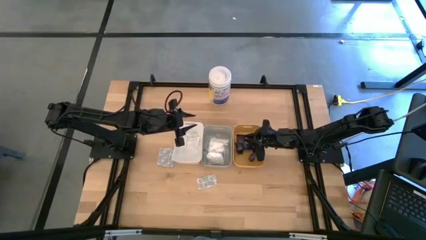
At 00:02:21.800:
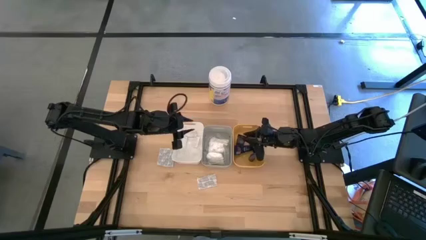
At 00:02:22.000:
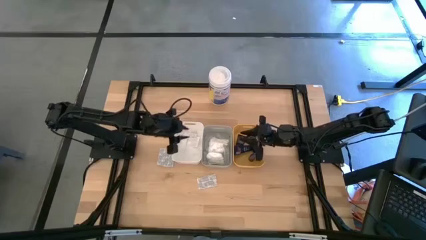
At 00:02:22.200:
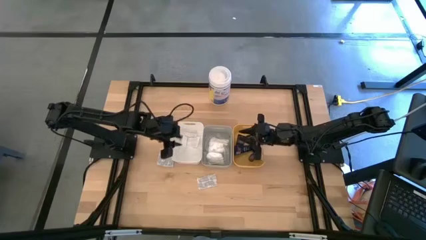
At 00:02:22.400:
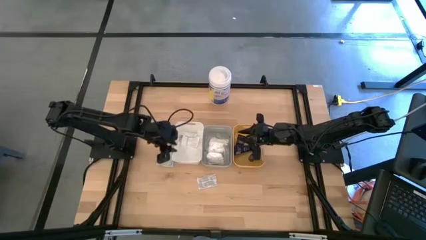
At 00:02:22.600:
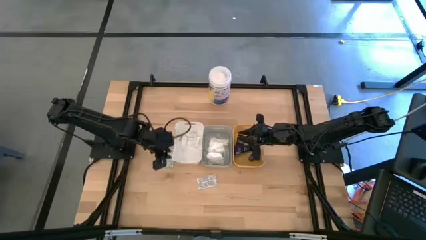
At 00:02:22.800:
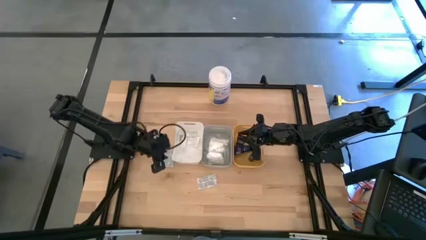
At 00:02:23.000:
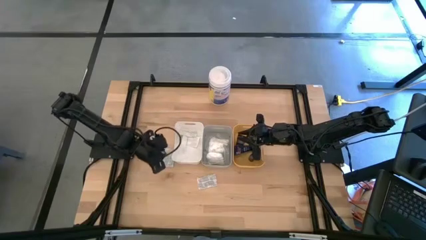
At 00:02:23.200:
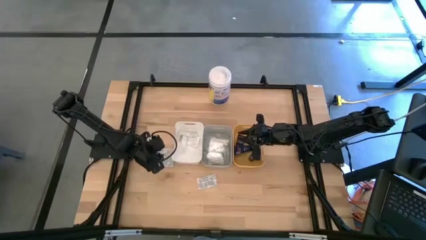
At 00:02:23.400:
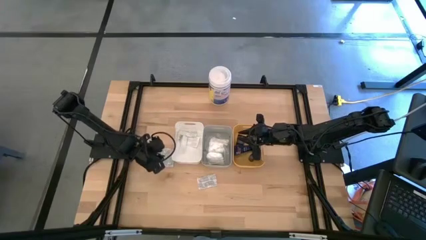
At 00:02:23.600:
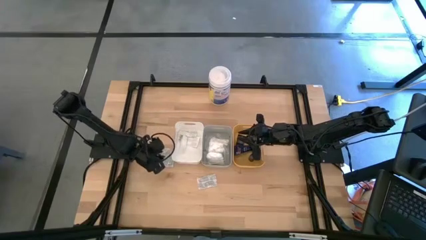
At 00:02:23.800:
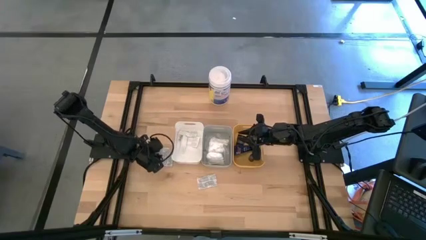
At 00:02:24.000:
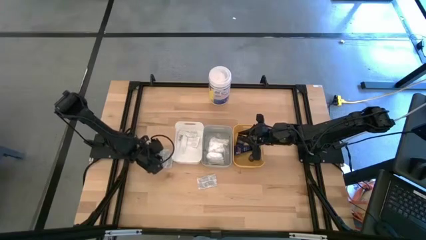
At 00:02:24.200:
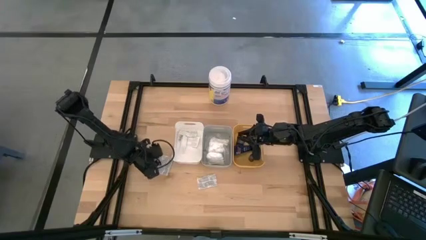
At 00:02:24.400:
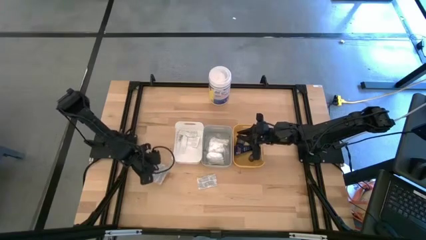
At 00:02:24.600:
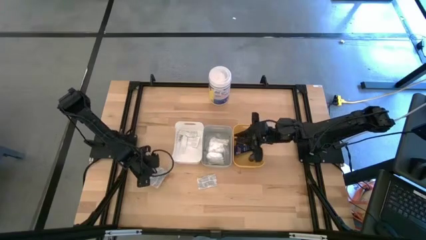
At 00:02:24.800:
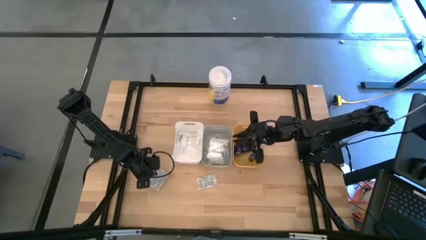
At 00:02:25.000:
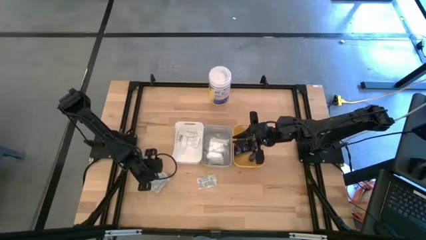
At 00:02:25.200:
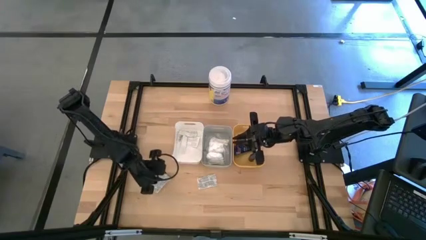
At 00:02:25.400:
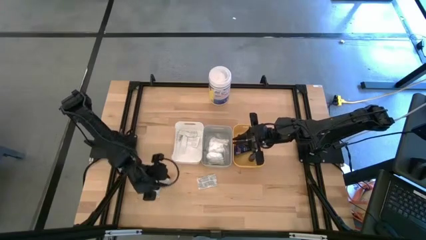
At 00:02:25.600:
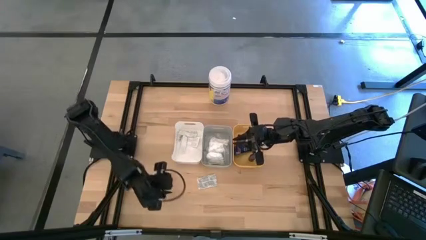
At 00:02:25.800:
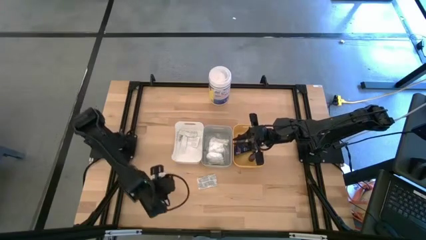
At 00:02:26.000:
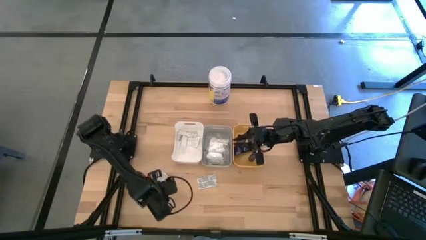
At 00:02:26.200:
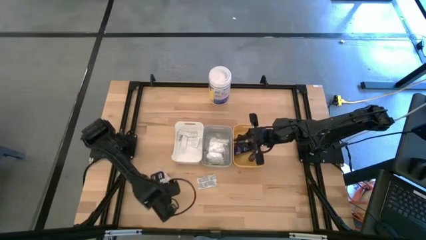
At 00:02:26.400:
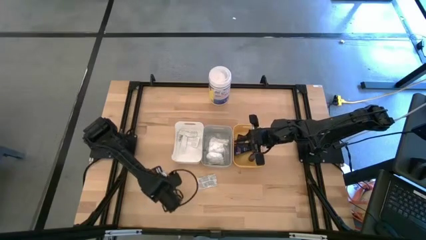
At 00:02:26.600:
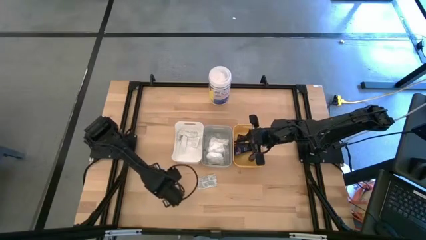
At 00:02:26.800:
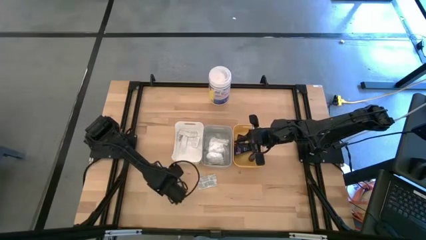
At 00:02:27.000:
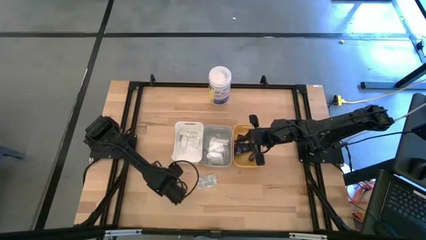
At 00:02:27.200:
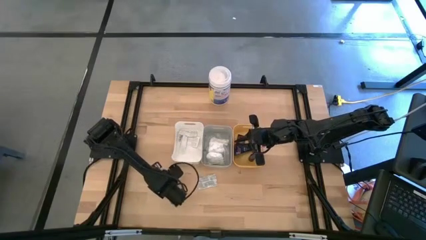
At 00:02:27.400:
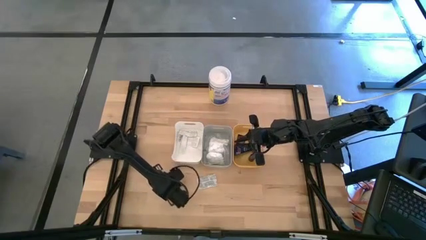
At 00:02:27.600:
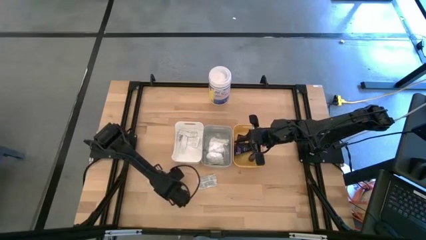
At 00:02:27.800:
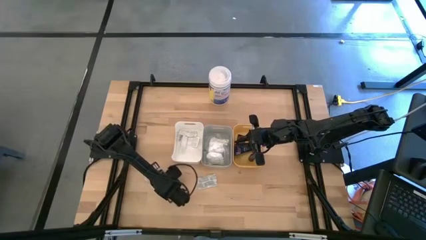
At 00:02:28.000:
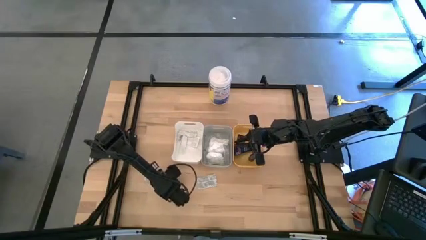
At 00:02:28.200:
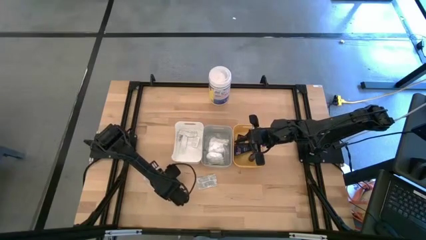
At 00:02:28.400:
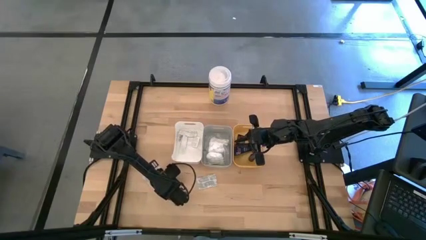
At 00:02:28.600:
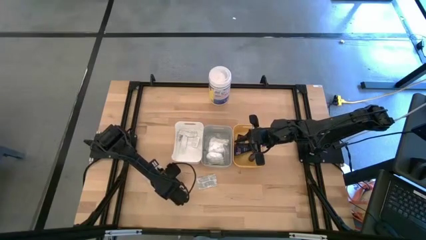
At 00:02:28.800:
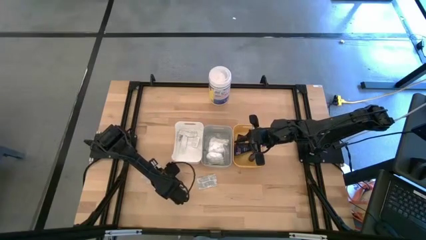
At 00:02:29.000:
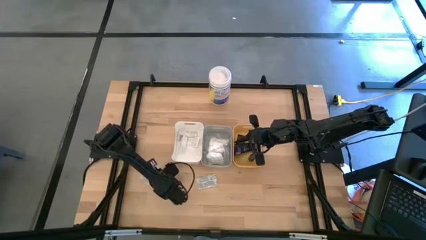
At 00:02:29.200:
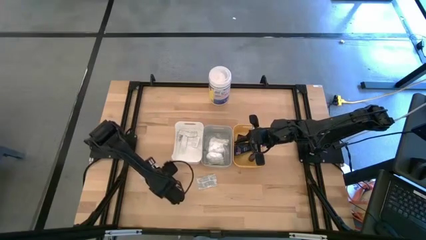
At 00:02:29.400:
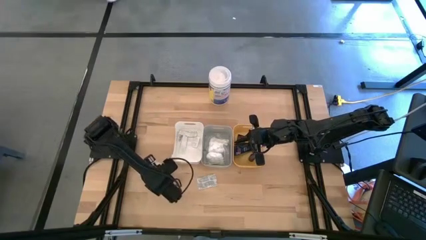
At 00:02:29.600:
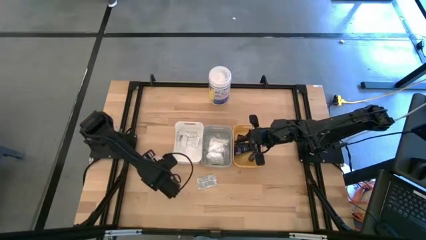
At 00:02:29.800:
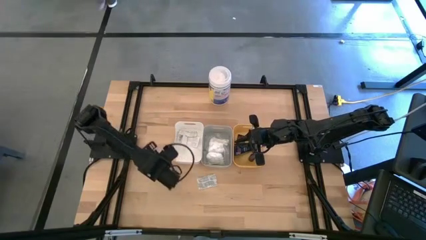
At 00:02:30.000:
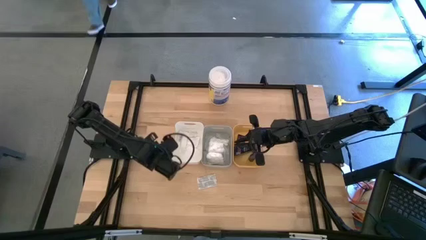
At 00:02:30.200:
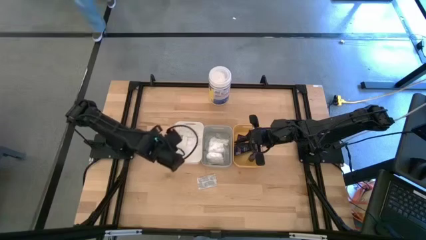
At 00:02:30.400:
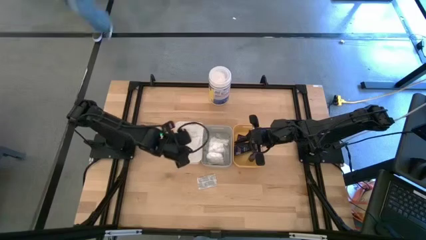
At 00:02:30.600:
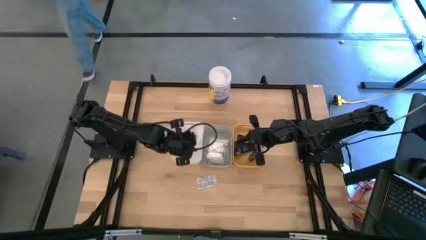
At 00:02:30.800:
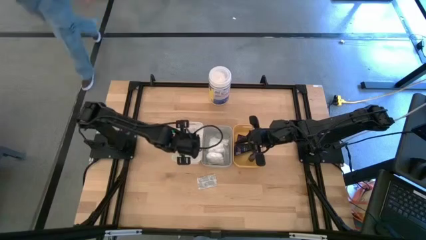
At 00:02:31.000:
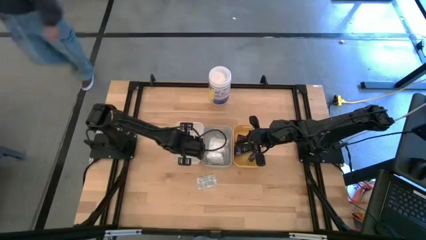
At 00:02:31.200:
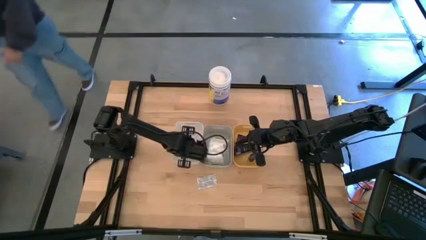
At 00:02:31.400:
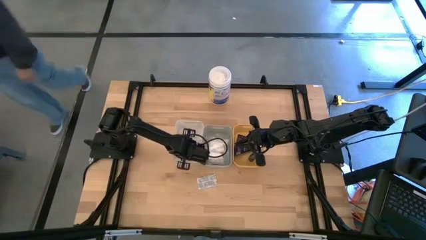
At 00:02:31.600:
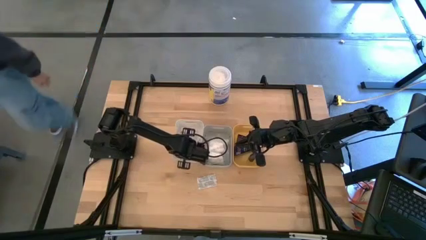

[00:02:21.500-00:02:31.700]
Task: Pick & Place Travel size toiletries
Put the white band-aid into the white bin

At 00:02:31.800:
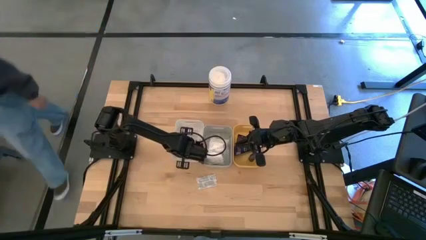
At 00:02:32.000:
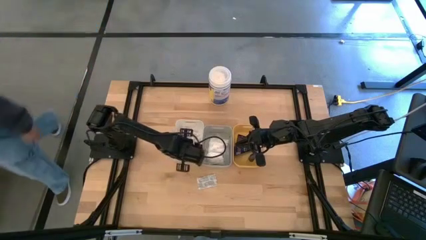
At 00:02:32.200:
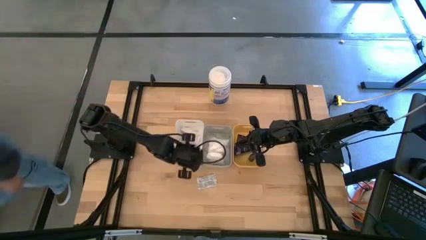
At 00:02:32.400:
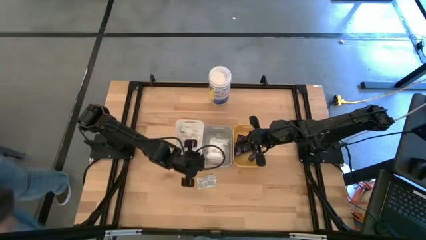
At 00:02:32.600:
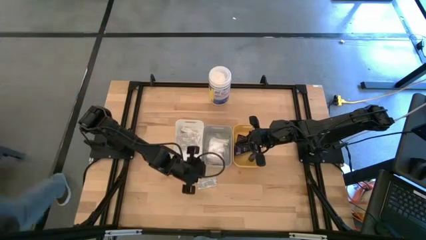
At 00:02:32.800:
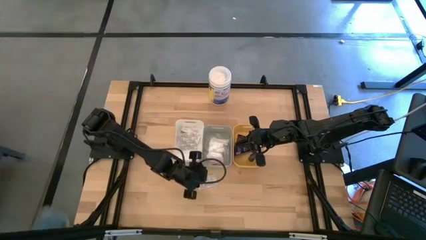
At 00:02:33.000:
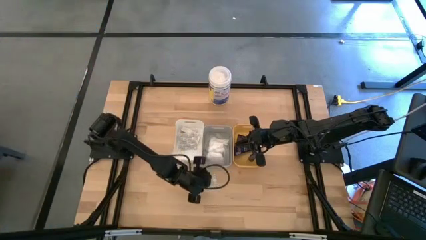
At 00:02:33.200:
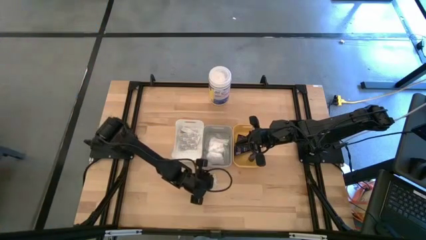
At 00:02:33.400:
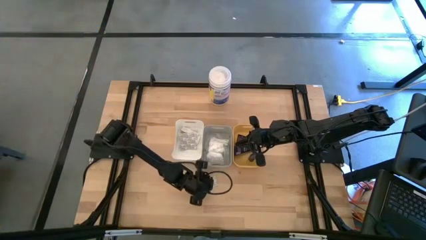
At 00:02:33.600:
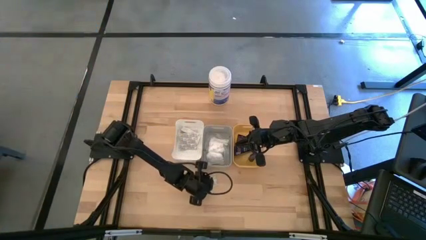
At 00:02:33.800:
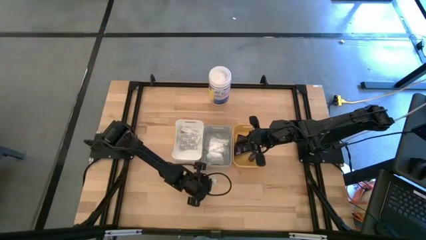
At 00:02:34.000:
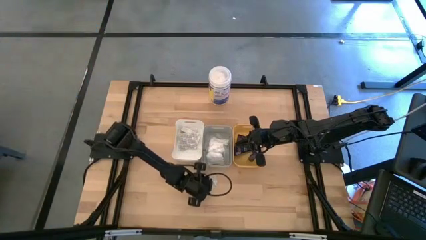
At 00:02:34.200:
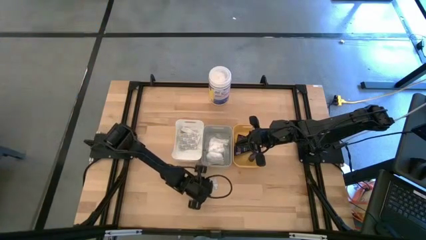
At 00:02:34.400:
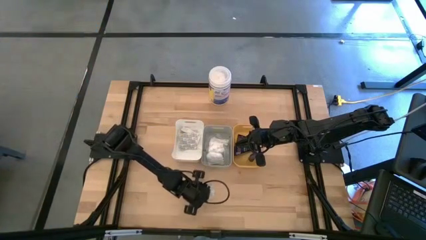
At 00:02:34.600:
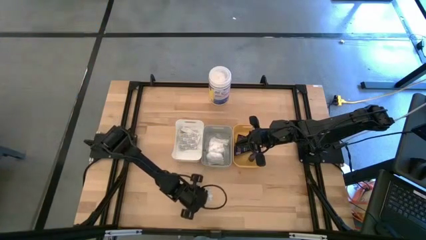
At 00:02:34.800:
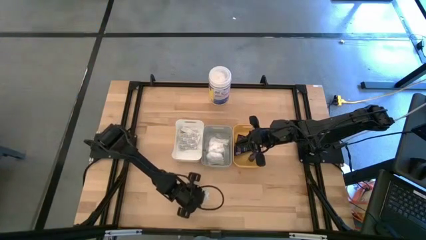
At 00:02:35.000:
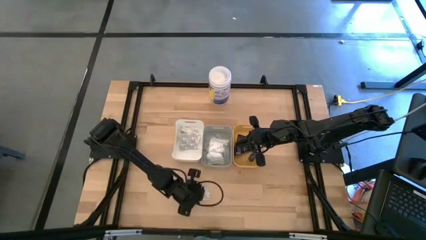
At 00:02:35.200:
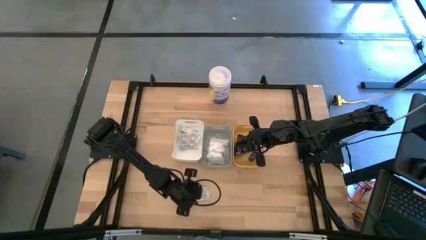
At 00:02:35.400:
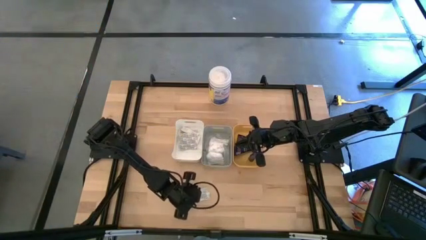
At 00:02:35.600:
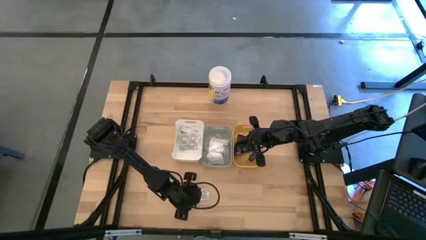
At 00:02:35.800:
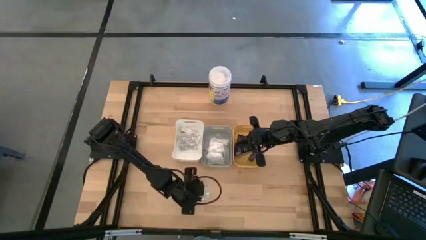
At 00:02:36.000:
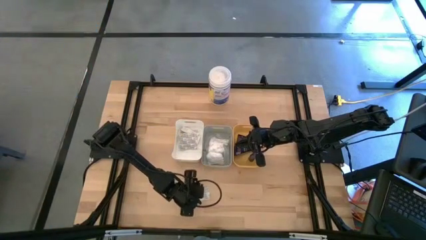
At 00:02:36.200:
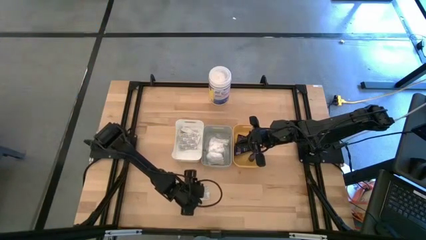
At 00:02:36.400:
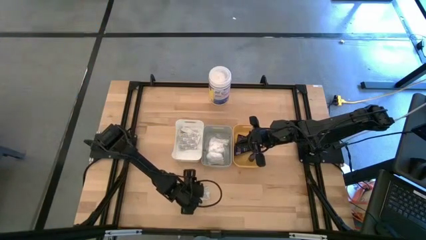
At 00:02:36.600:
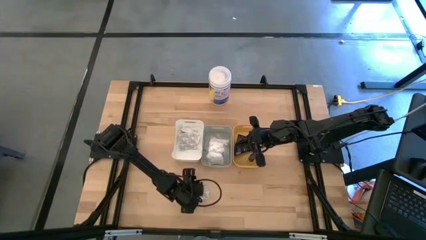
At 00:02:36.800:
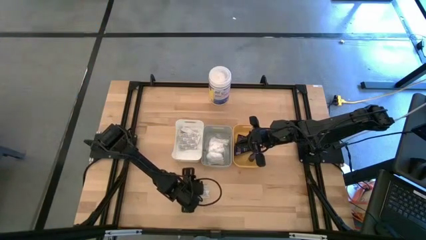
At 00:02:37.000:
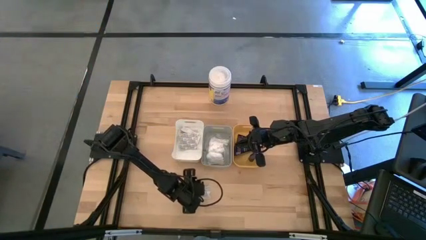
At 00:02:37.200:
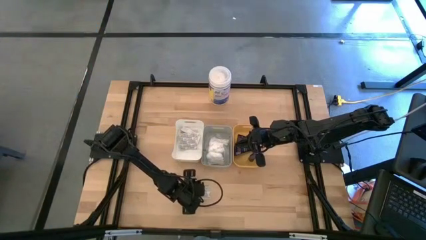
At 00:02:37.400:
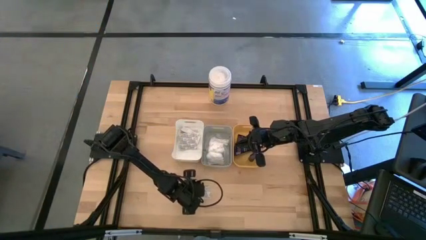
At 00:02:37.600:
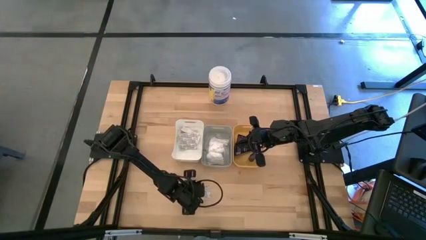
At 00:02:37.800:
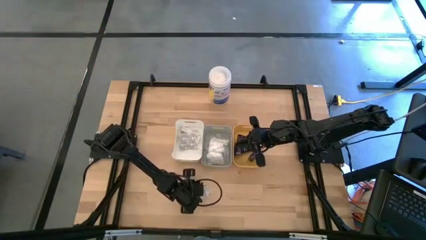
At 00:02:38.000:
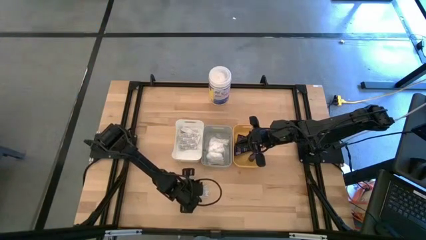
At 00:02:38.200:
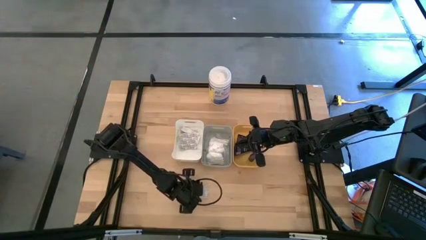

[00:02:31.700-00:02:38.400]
Put the white band-aid into the white bin

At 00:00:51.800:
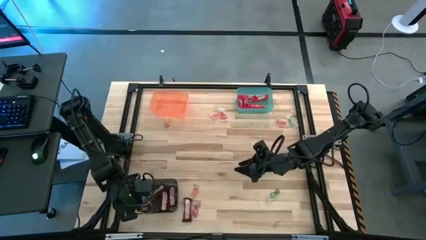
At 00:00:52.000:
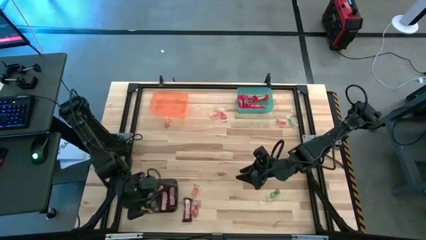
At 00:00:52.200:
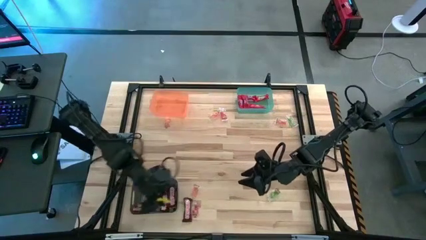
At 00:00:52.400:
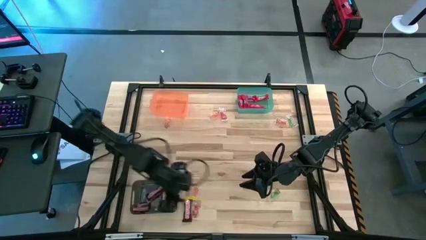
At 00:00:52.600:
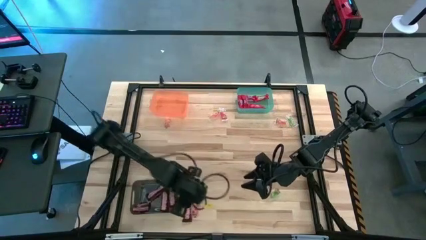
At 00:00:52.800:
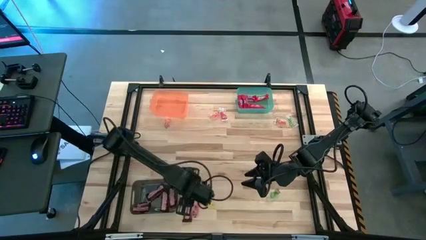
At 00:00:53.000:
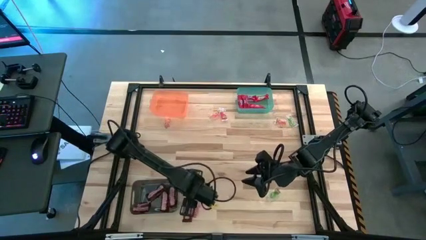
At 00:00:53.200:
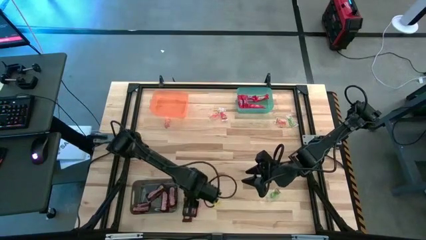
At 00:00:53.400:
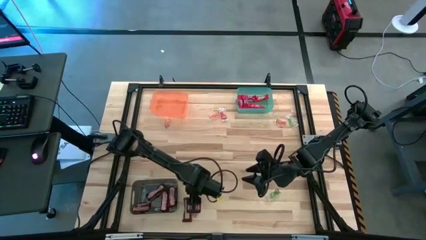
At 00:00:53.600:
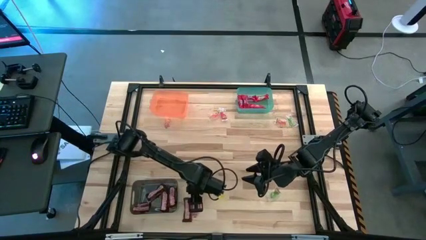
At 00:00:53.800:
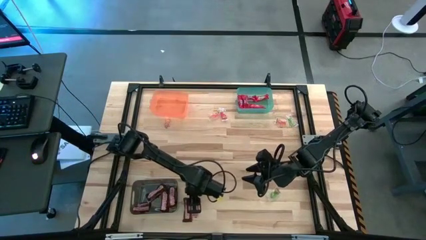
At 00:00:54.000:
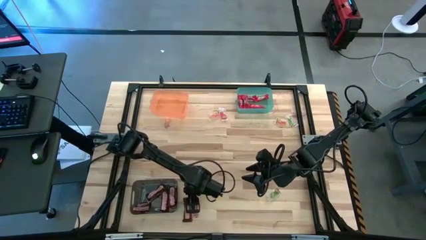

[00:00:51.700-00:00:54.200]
Task: Sort candy by brand, put in halloween buckets
Put the brown chocolate bar into the black bin
